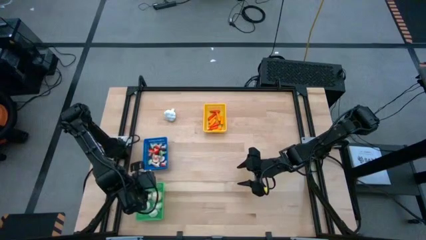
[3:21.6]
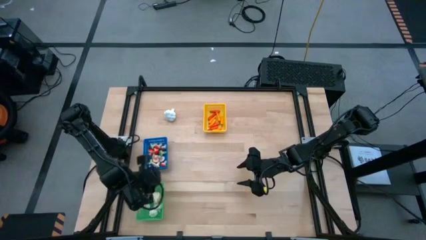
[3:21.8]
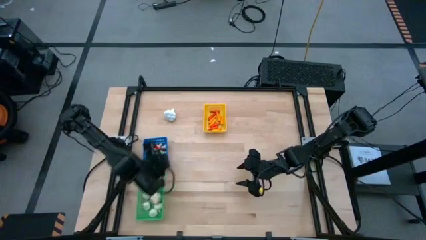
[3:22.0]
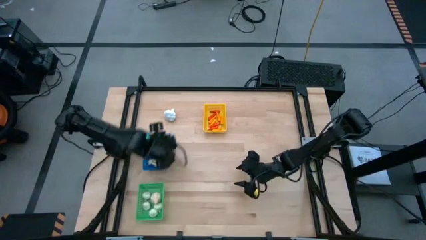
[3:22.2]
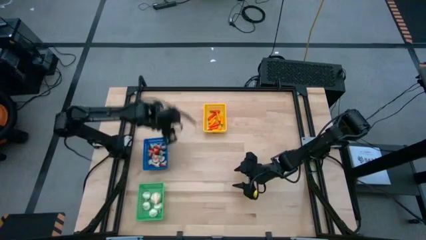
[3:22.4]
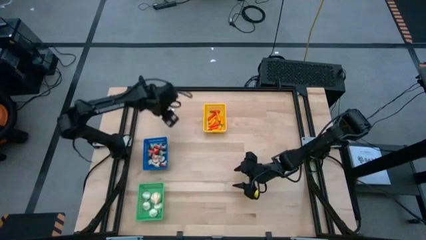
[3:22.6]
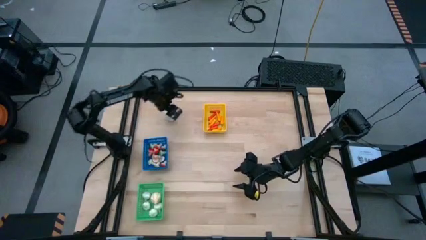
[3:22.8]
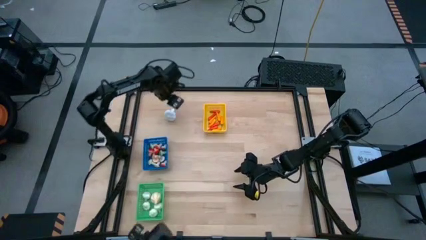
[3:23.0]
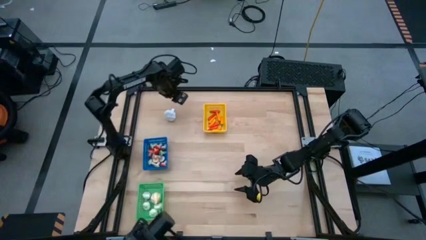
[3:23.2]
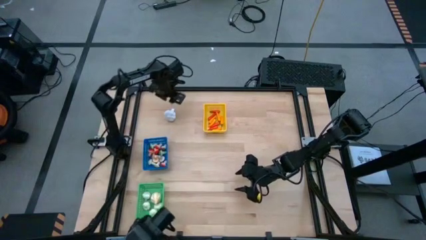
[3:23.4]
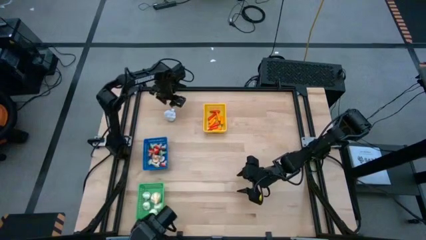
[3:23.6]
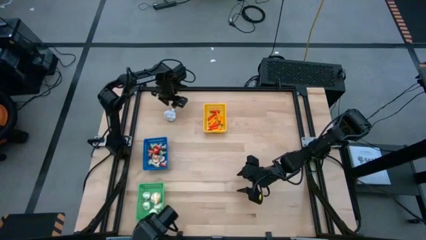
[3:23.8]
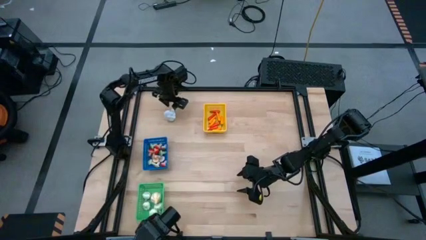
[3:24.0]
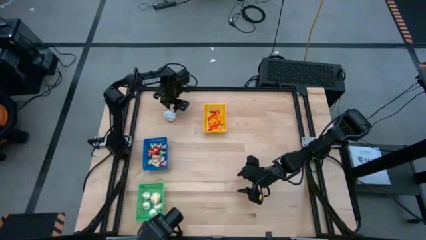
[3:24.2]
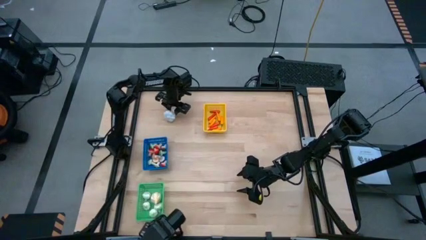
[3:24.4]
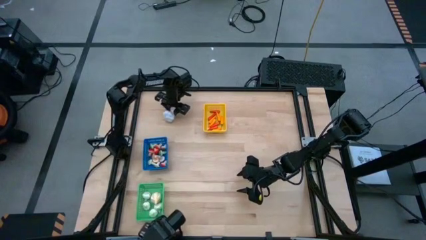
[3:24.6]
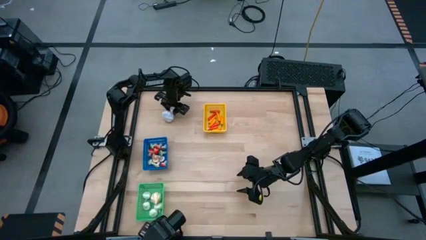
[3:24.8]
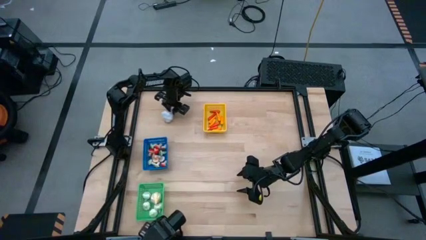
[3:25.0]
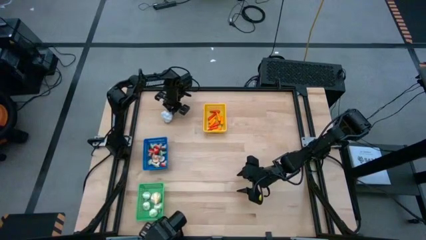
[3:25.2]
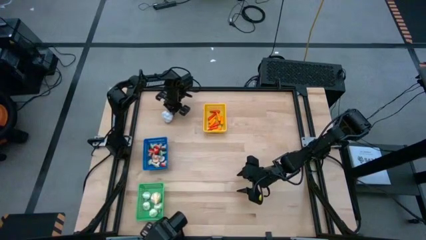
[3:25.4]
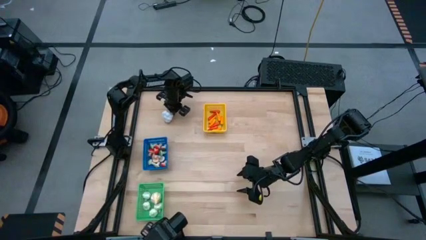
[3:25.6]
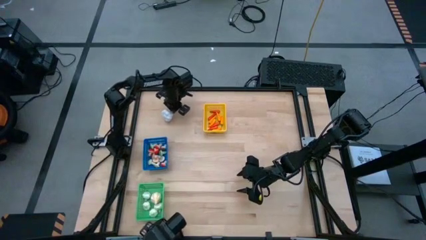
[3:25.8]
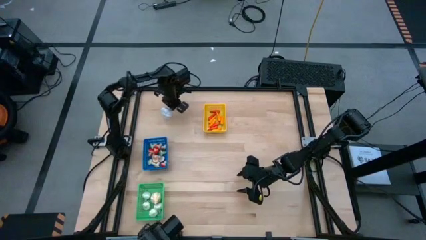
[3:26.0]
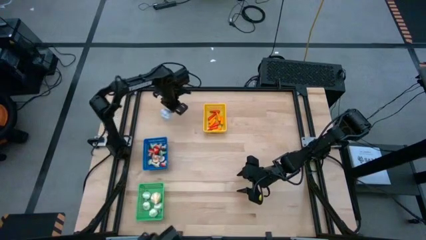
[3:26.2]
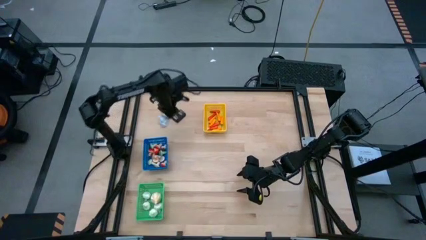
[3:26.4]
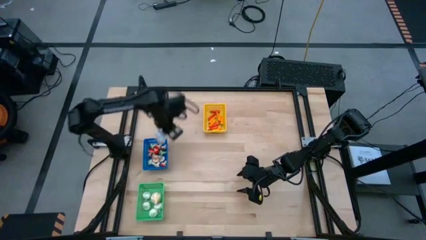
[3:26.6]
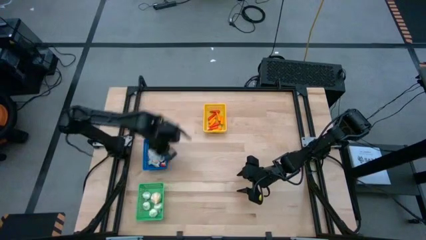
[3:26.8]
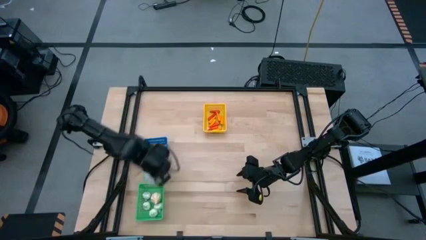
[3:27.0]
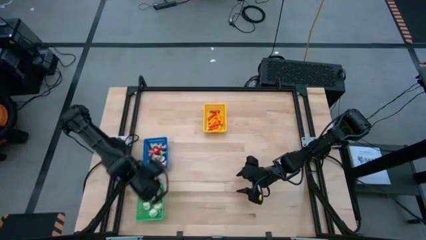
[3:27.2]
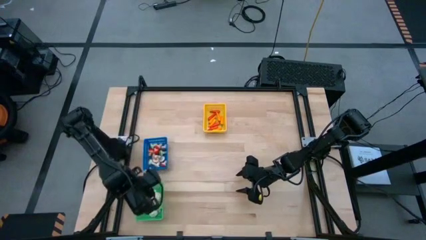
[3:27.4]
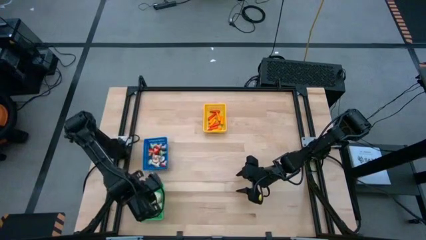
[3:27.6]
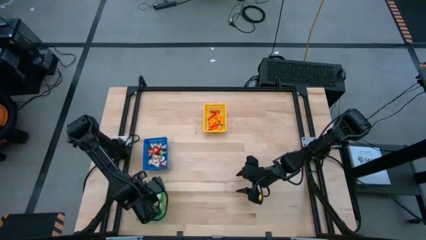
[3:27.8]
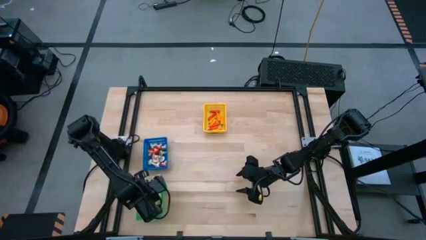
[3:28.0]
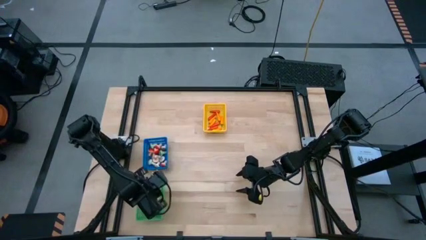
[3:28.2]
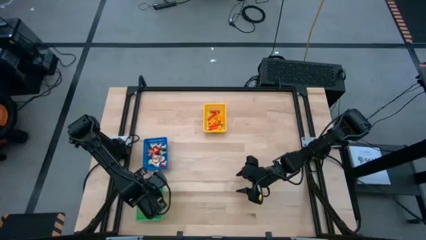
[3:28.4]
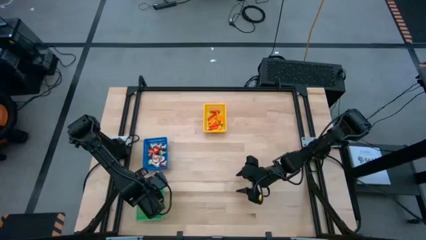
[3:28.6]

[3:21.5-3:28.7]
Task: Sort produce into baskets
Put the garlic into the green bin

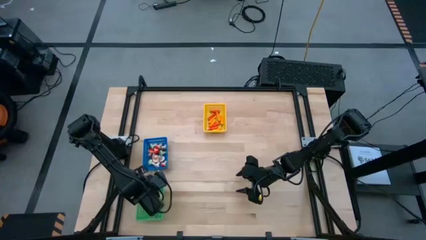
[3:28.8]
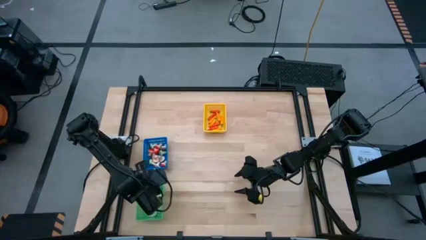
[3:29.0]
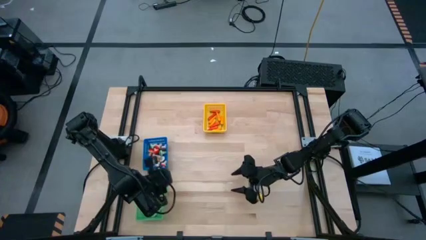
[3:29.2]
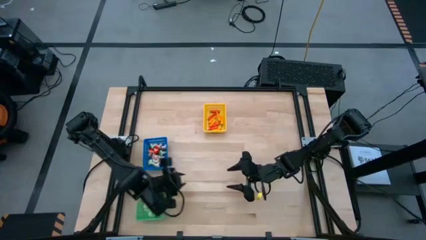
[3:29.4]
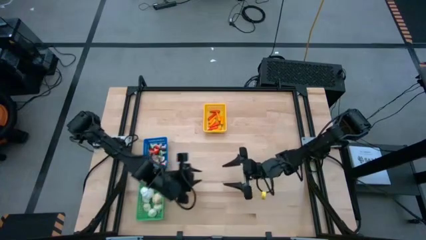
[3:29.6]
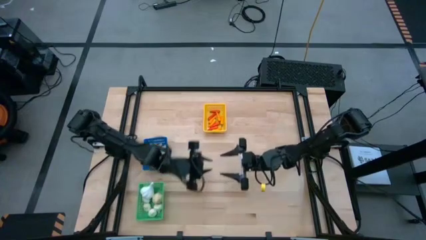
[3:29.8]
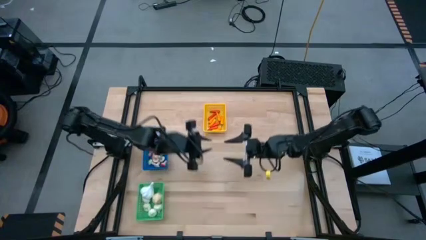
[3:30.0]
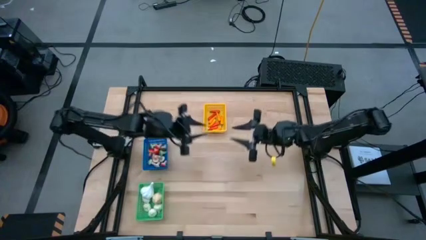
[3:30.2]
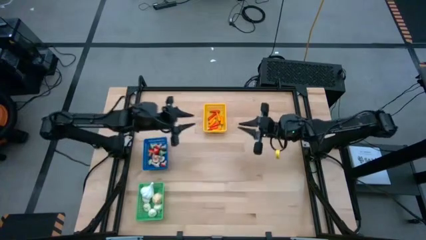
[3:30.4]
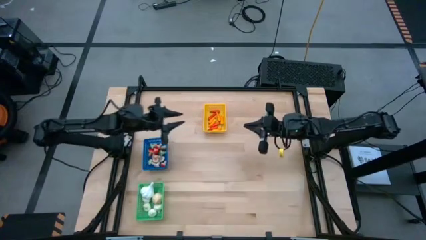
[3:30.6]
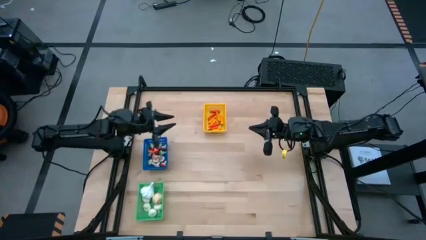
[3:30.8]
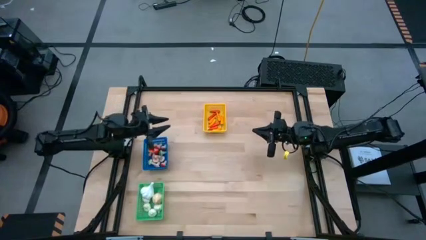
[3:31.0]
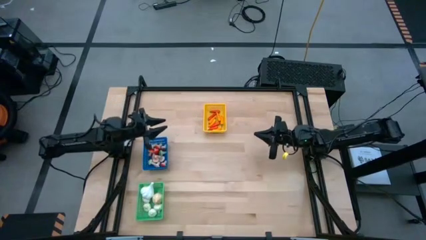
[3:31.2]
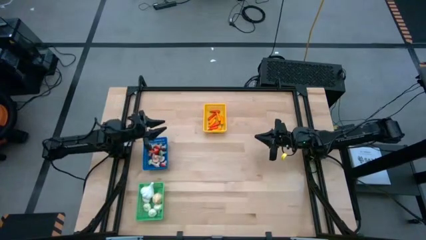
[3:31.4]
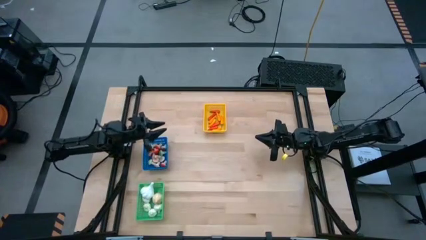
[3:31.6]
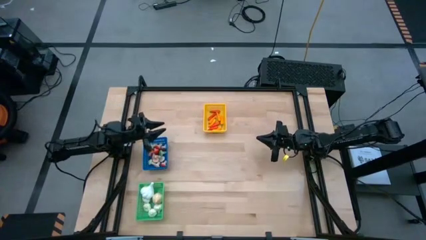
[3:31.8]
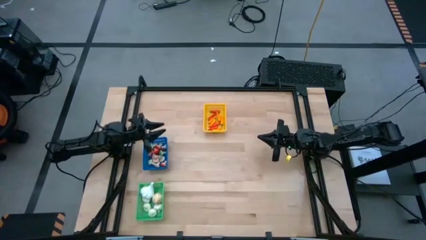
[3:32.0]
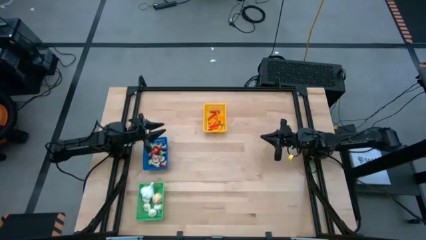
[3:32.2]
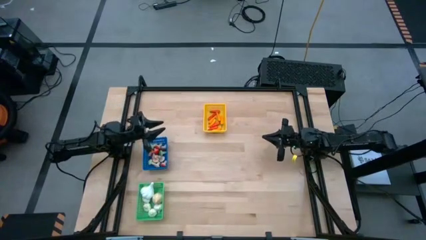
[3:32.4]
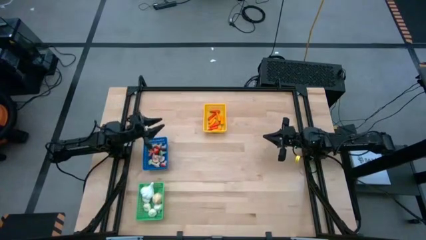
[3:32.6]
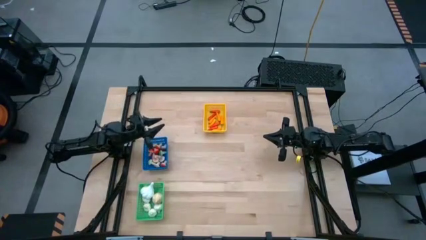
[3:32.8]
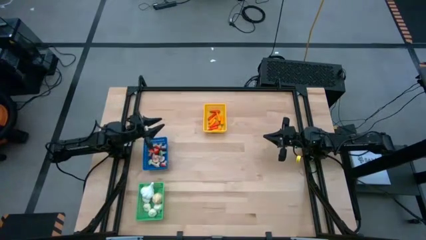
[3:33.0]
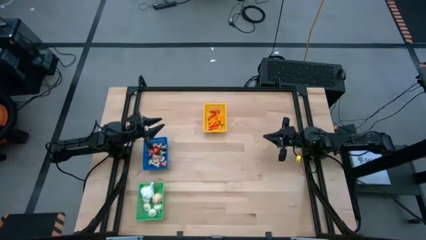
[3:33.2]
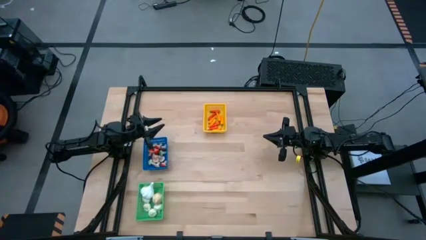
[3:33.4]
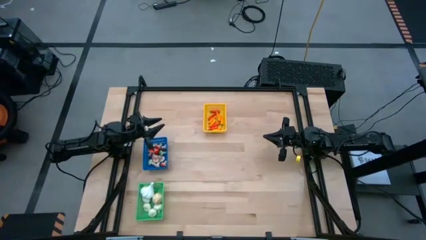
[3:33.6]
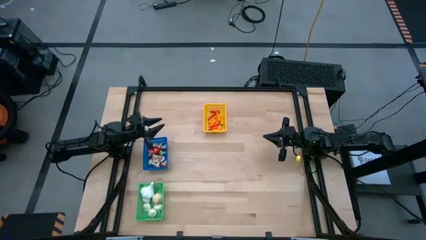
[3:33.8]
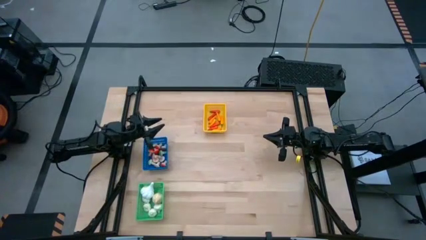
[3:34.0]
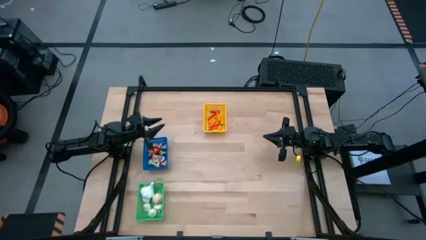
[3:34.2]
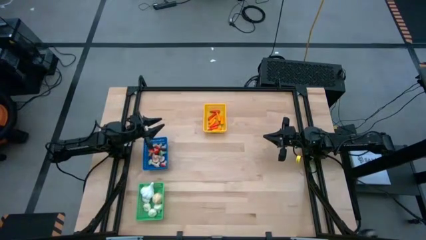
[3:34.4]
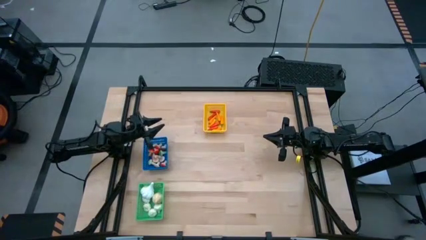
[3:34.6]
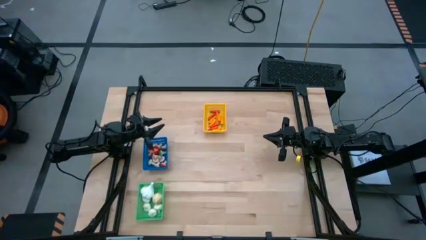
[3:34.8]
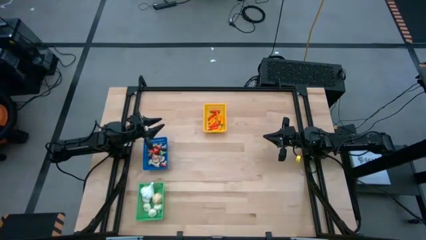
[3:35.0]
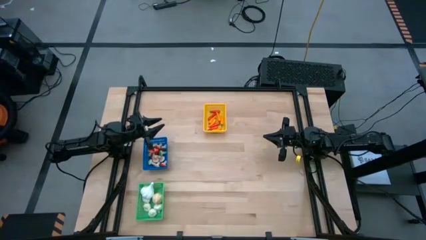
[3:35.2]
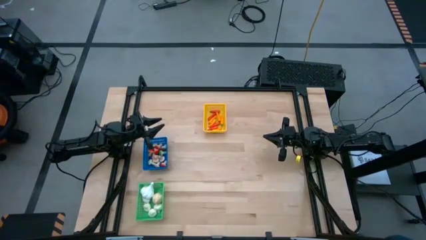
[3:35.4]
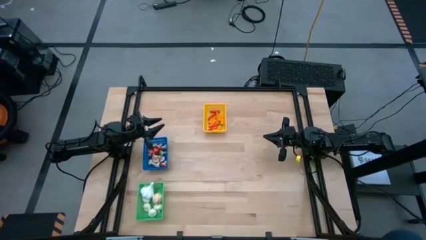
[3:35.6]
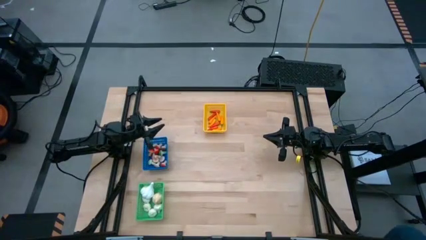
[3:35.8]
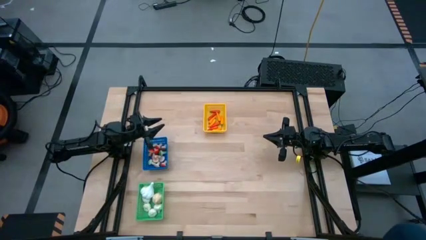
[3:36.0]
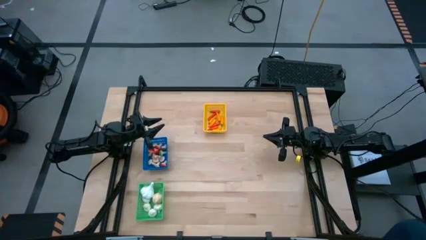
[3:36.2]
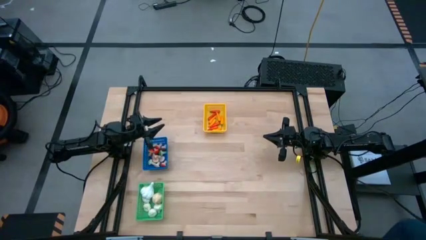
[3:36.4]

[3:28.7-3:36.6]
Return to Home Position

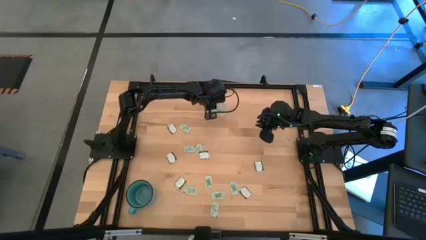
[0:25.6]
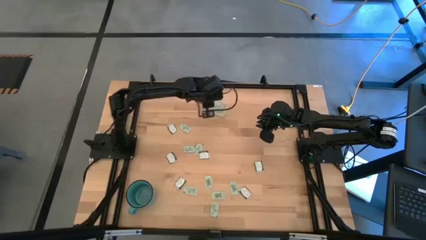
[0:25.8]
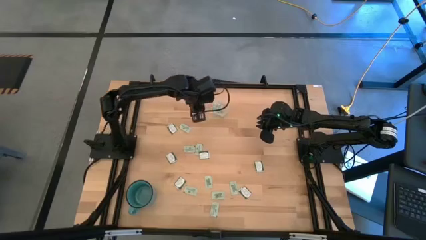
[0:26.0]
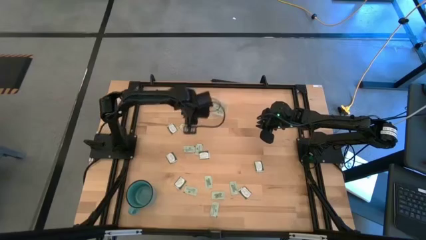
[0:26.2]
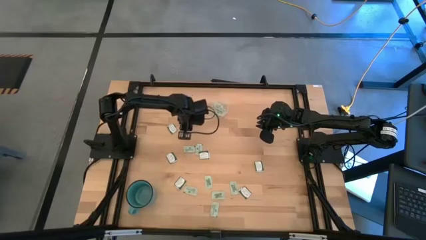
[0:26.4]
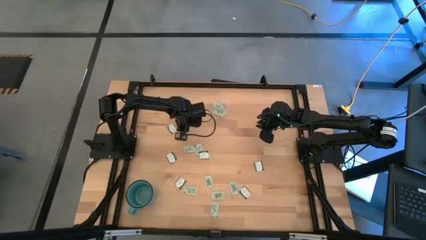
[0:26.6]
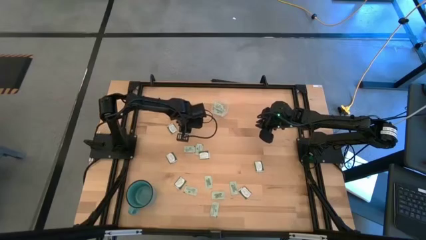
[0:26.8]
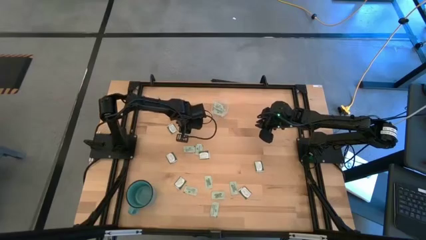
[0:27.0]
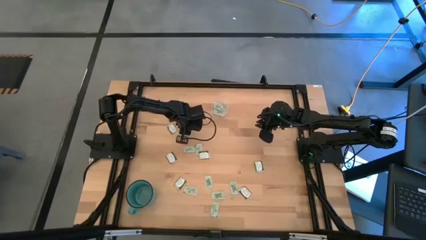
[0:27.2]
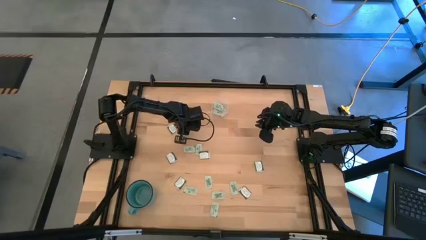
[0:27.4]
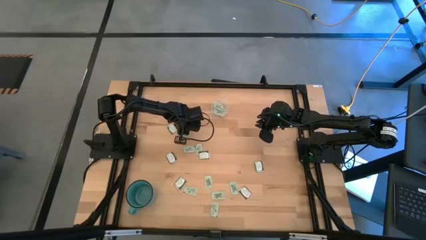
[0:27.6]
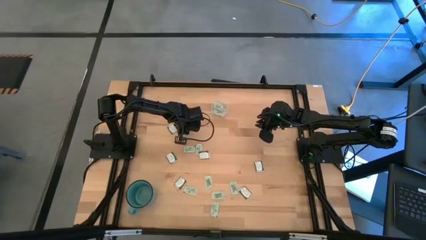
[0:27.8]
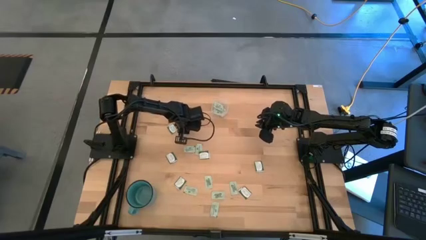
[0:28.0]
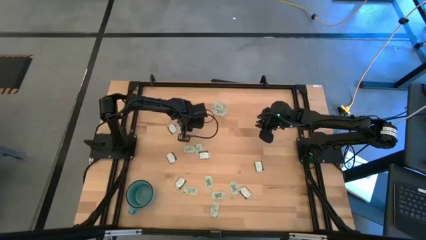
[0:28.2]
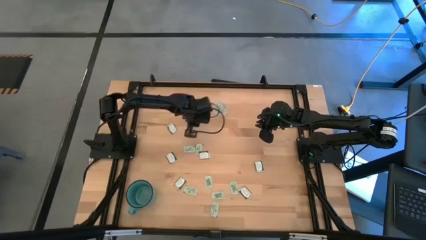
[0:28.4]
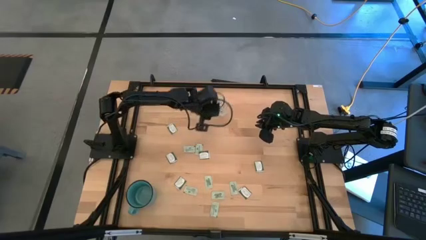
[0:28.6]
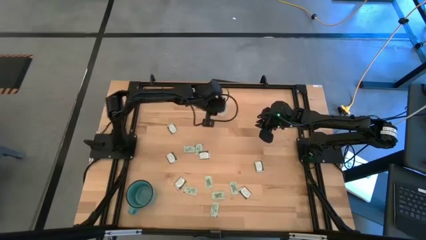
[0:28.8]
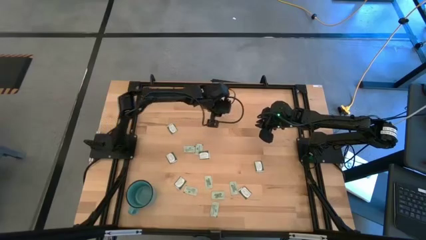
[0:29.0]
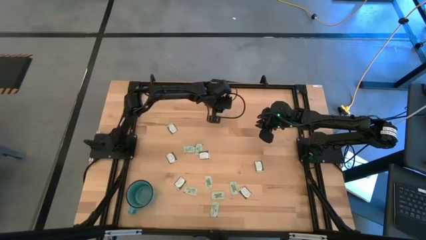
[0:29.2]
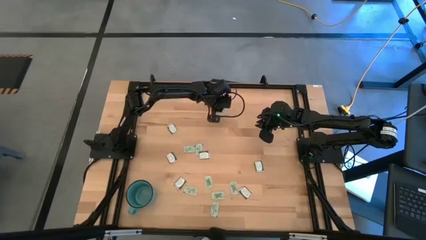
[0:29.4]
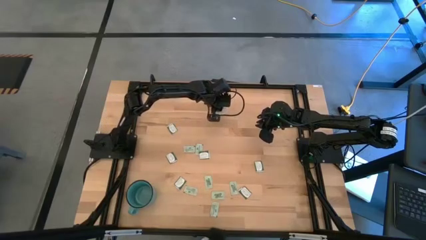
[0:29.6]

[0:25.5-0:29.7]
Task: Pick and place items into bin
Put the light green stevia packet into the transparent bin
